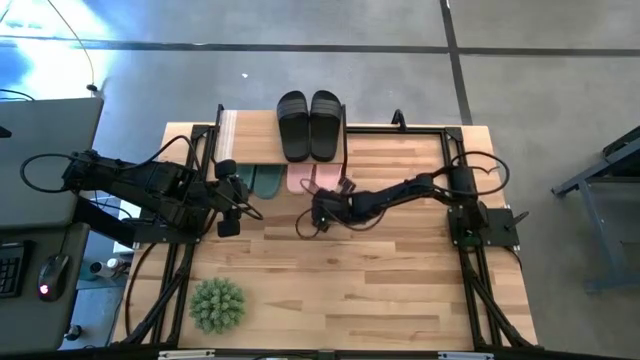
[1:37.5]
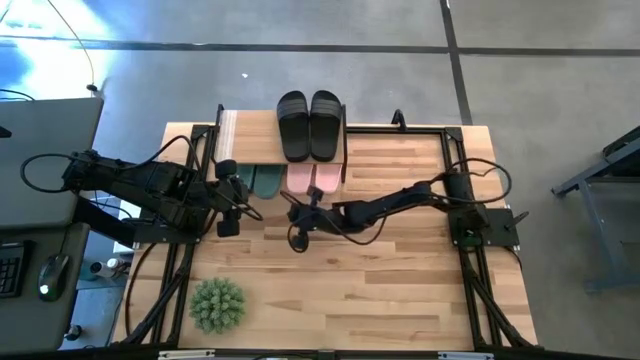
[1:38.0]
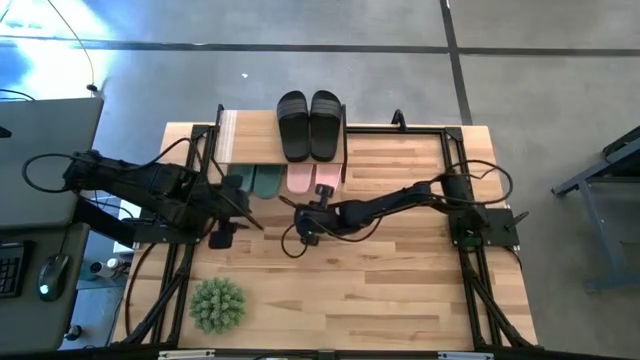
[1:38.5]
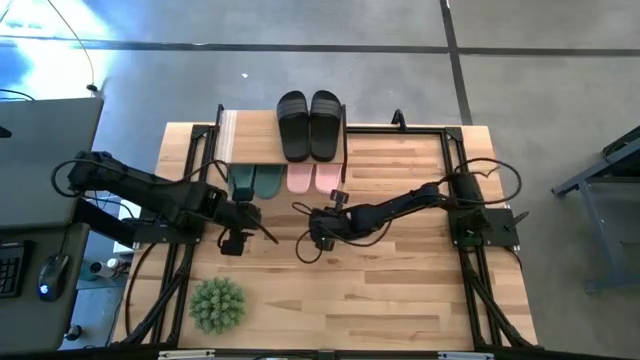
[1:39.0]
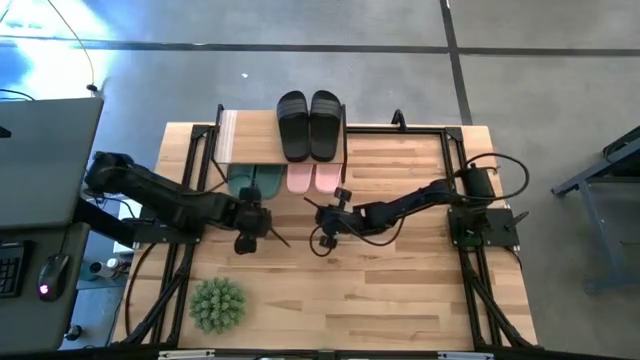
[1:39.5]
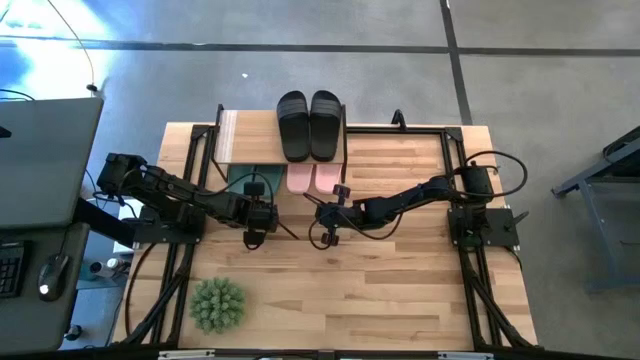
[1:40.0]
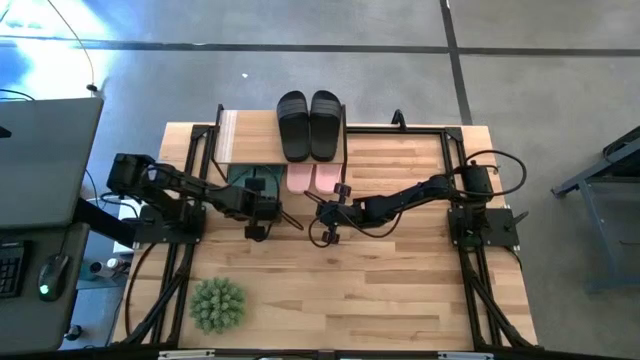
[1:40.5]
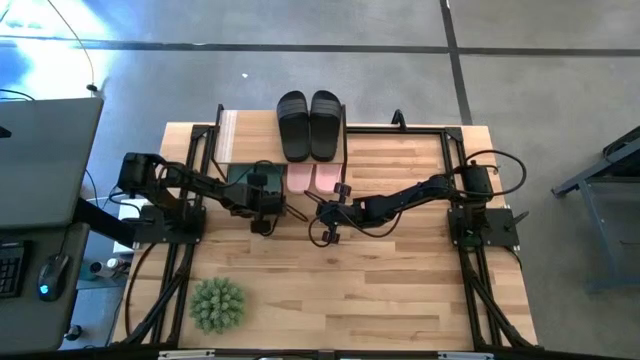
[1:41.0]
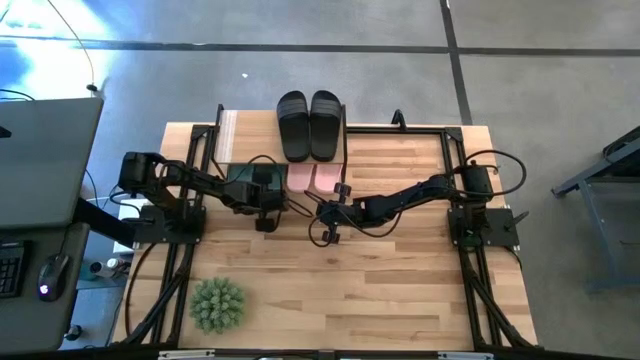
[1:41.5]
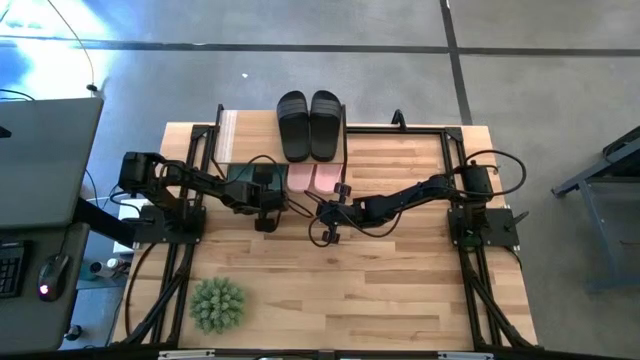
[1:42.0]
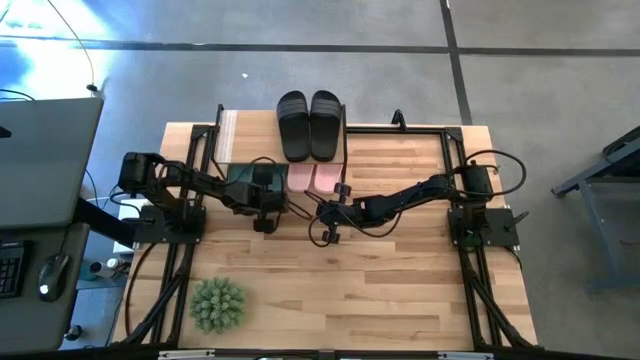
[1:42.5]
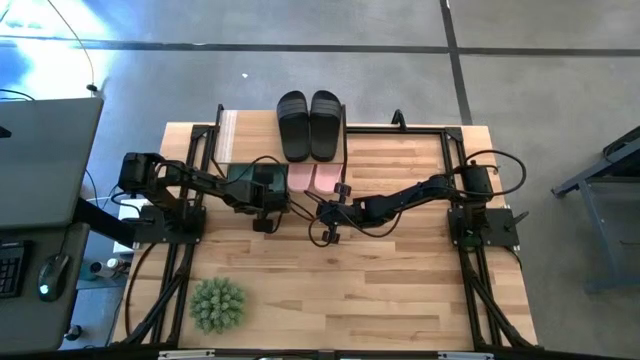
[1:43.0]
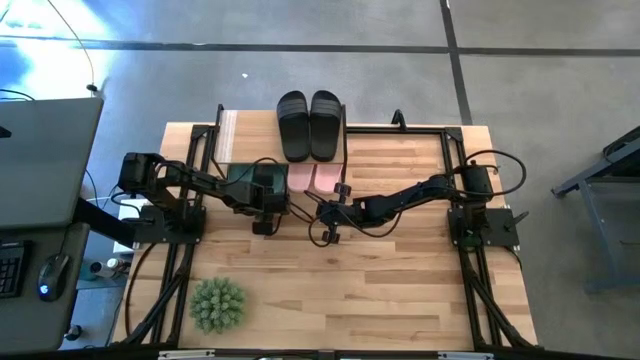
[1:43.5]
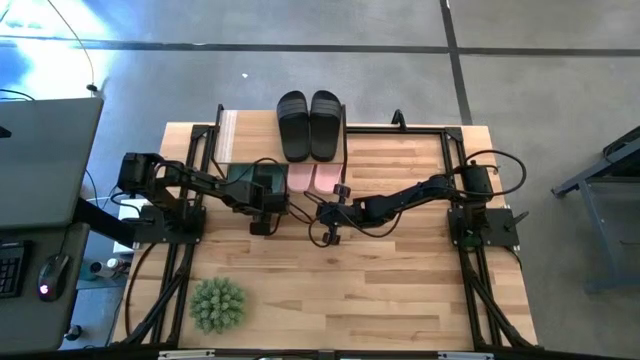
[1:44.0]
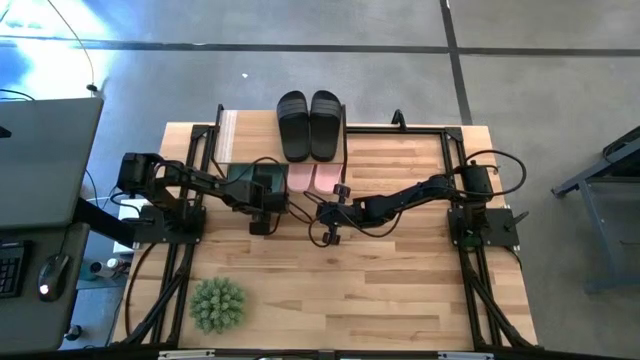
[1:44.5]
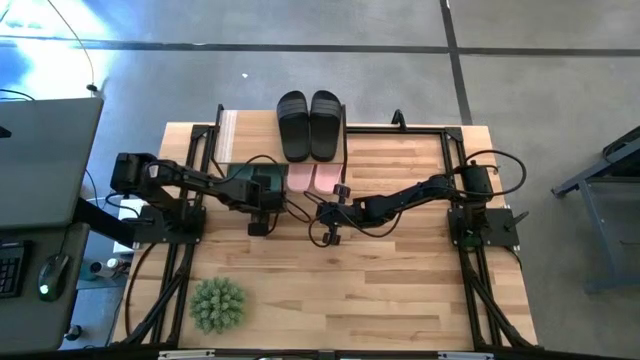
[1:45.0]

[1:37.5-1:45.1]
Task: Pick and place slides into the shelf
Adjust the right green slide under the shelf

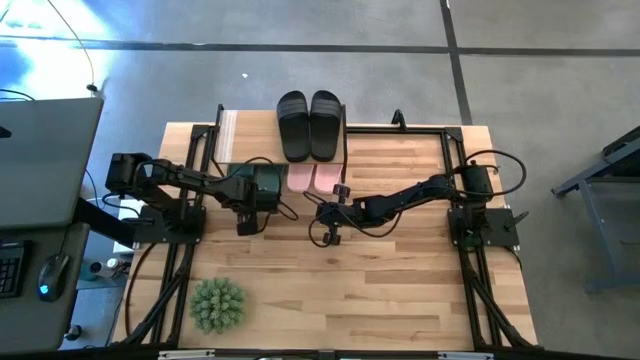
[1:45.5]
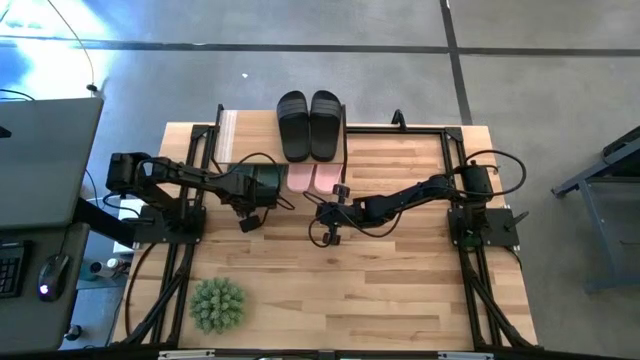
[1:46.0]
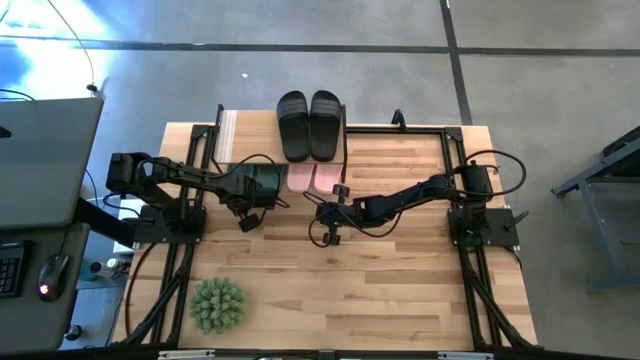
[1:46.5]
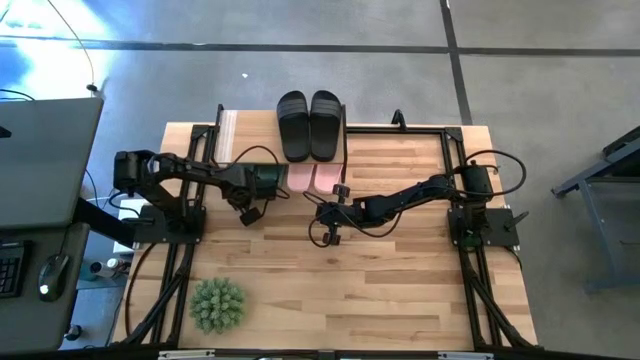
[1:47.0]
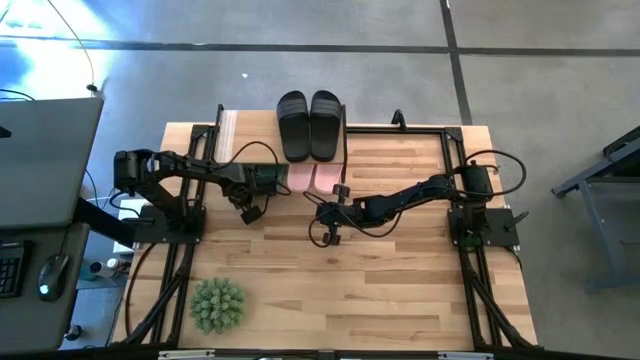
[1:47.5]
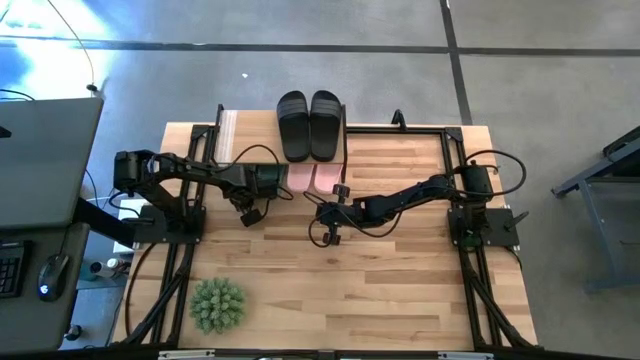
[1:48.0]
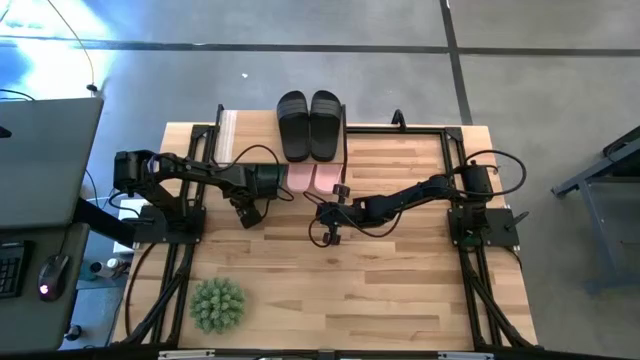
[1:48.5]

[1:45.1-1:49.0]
Adjust the left green slide under the shelf

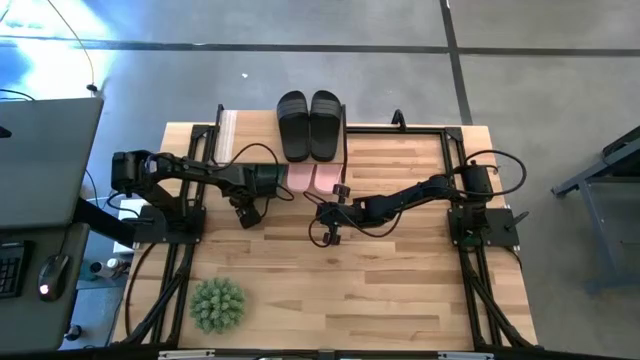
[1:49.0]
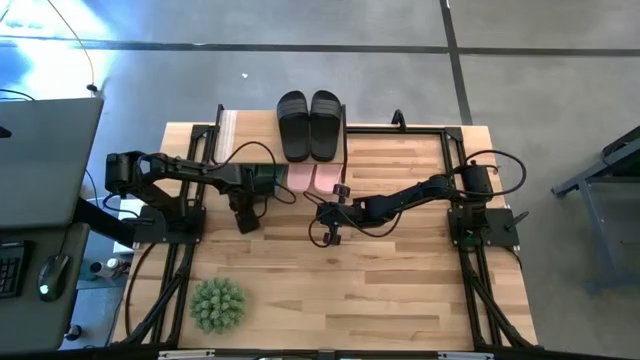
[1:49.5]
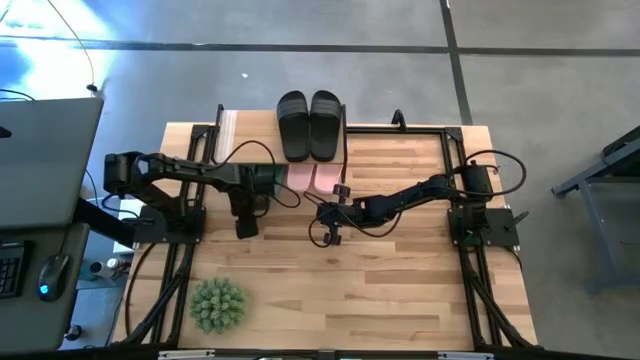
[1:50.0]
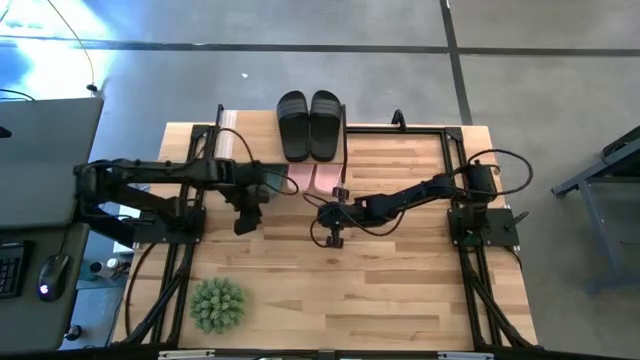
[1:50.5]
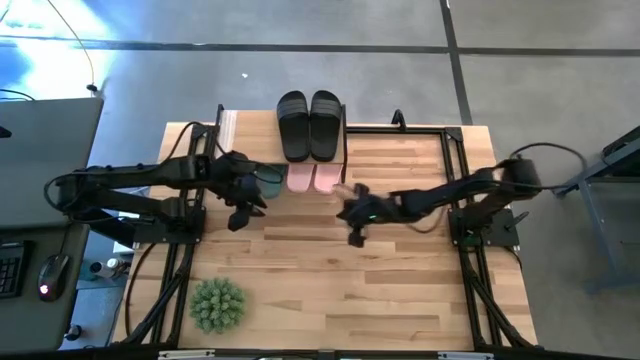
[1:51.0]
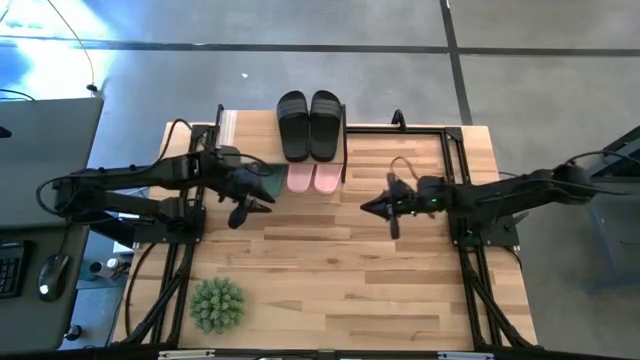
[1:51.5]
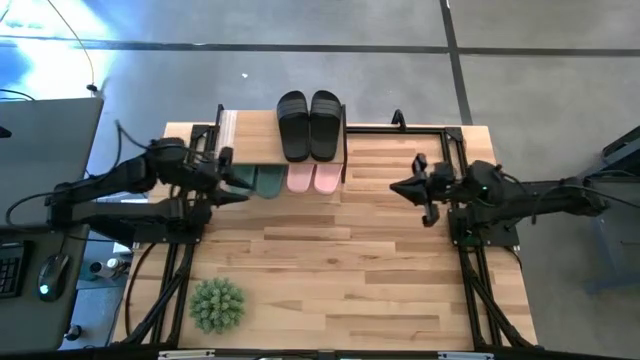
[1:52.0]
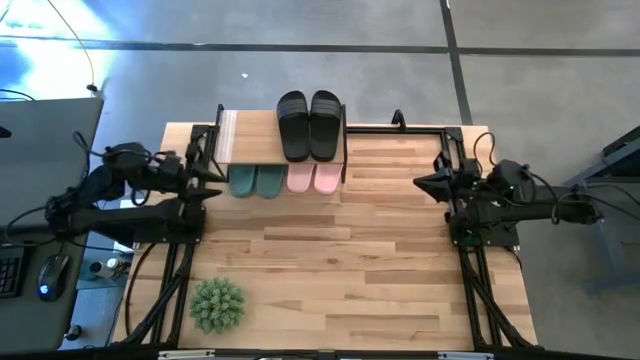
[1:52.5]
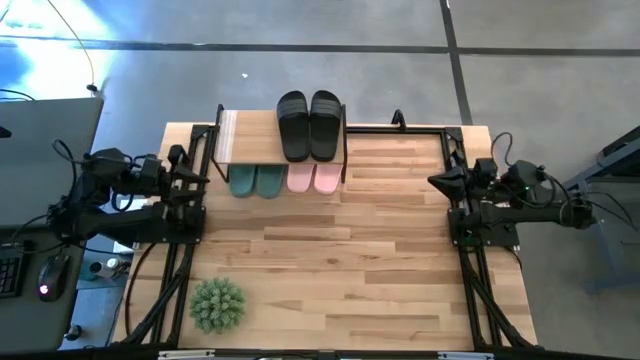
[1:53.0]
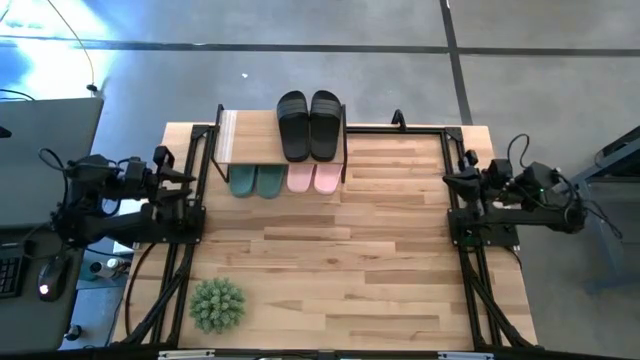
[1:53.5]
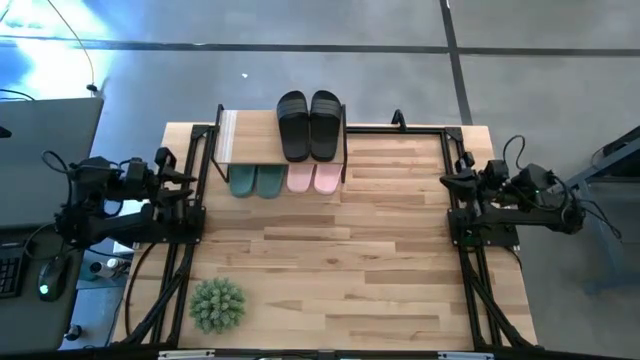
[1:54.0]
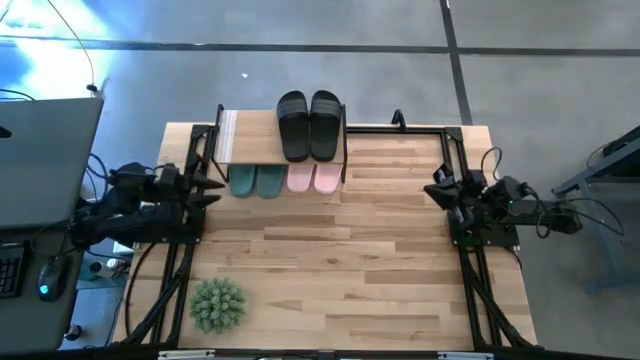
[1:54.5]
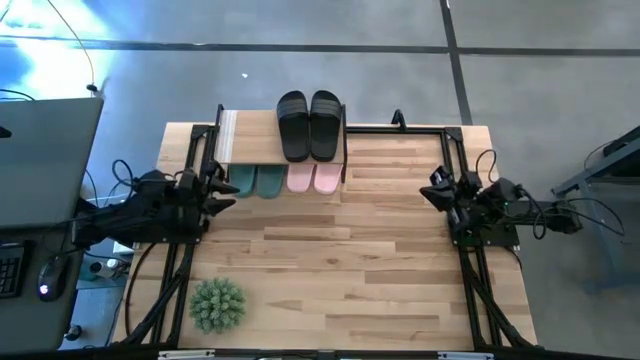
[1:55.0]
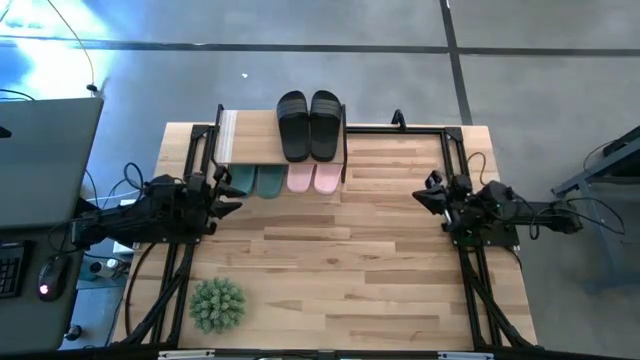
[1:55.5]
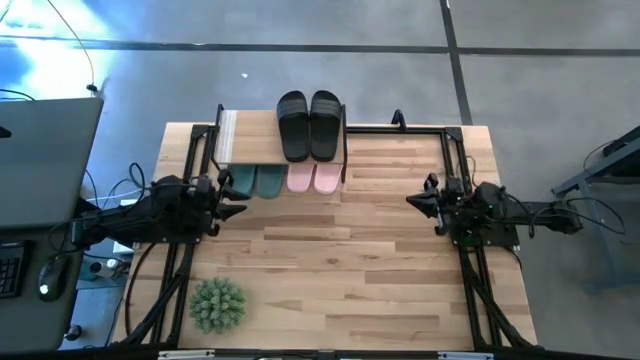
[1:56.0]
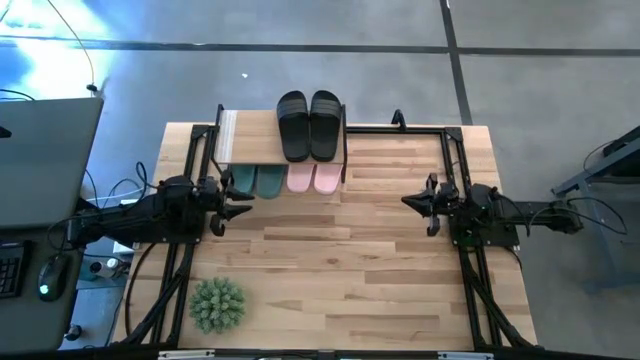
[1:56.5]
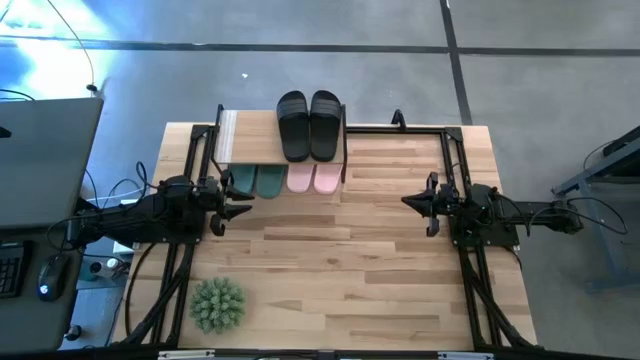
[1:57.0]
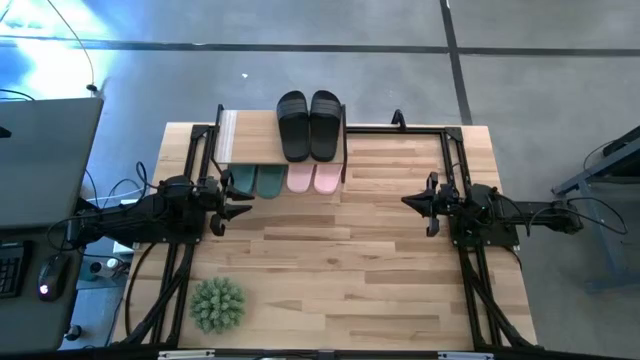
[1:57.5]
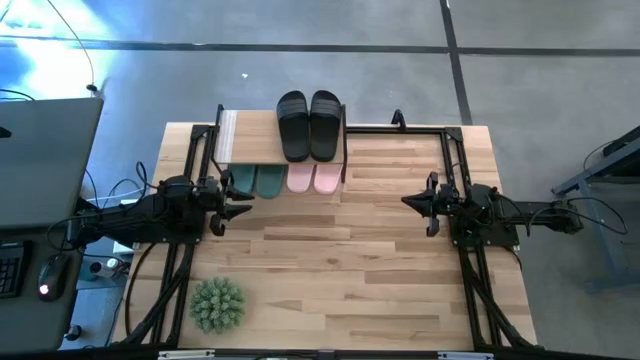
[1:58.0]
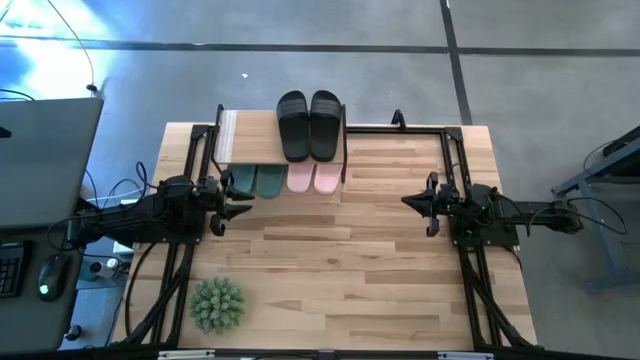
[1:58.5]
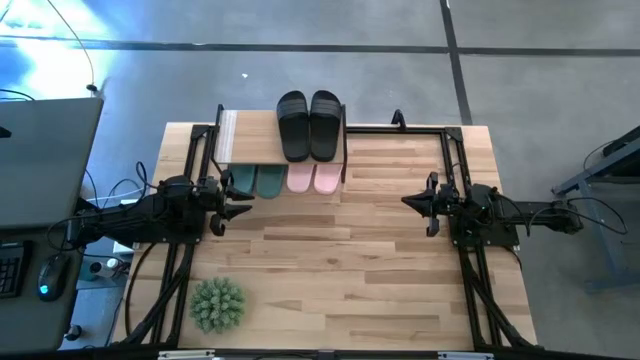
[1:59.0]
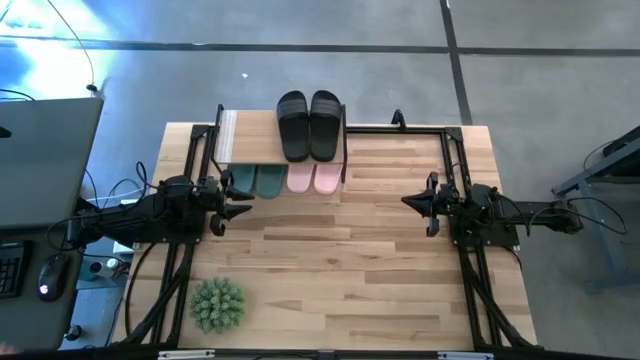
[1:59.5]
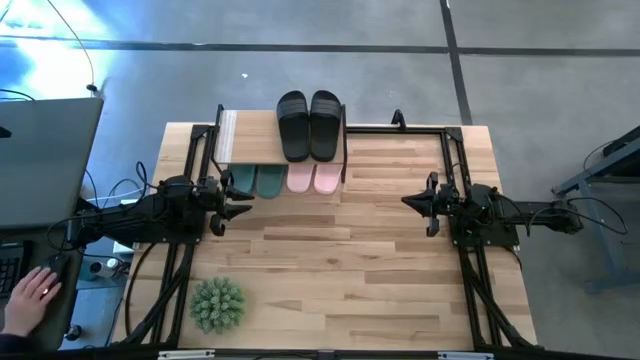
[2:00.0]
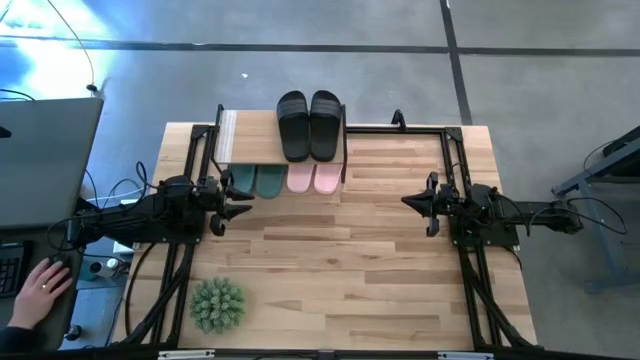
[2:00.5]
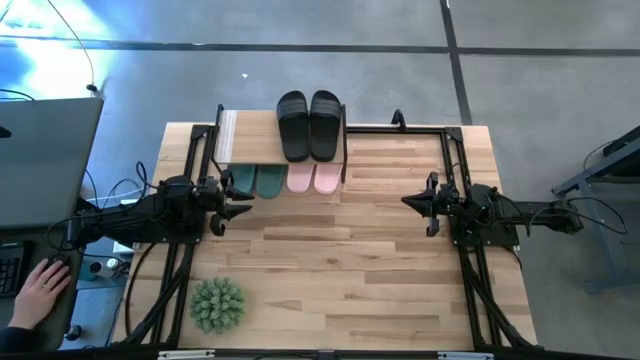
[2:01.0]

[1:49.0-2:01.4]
Return to Home Position
